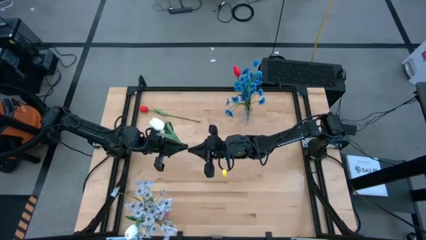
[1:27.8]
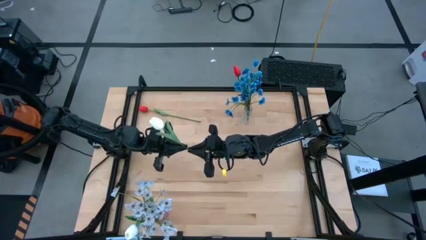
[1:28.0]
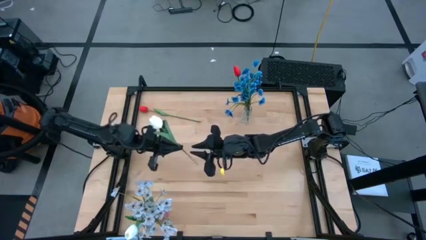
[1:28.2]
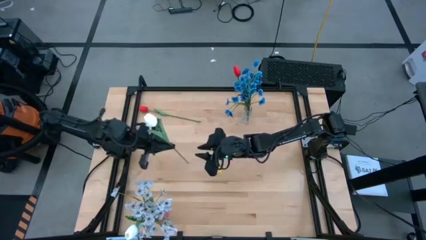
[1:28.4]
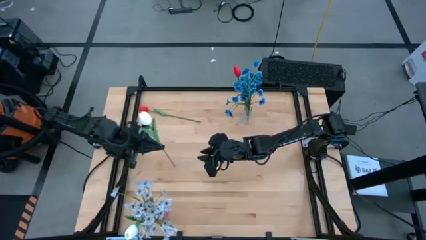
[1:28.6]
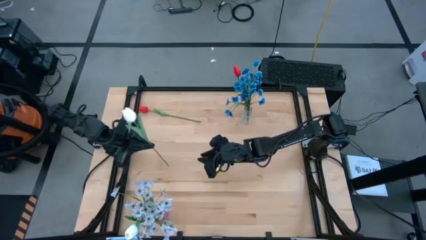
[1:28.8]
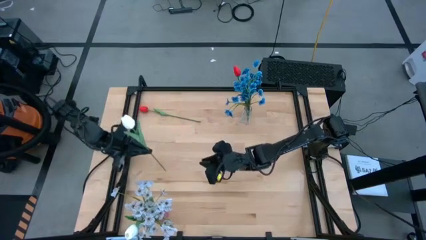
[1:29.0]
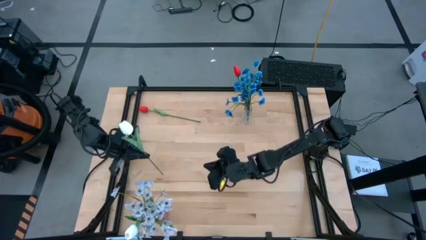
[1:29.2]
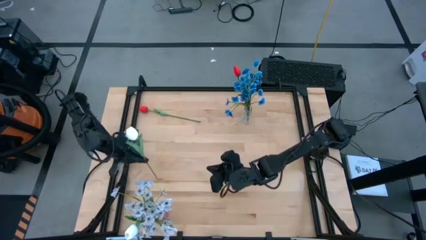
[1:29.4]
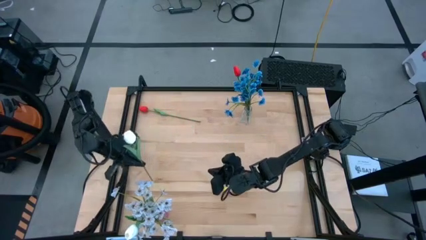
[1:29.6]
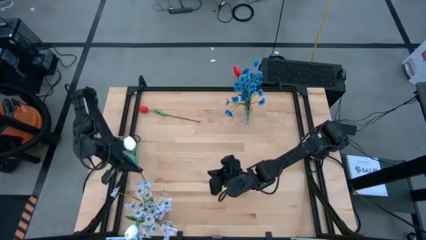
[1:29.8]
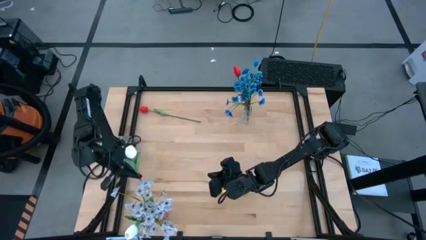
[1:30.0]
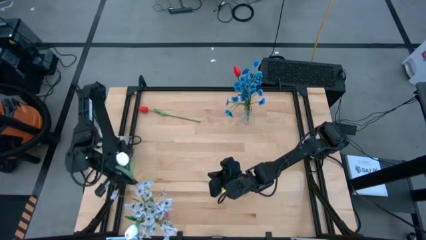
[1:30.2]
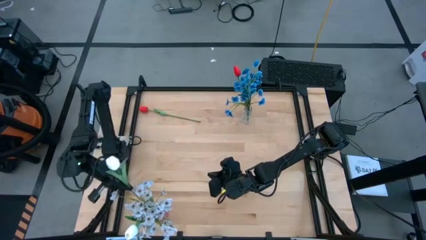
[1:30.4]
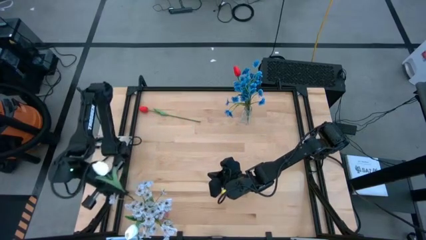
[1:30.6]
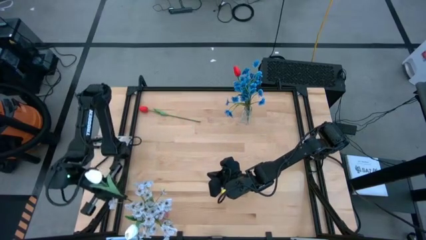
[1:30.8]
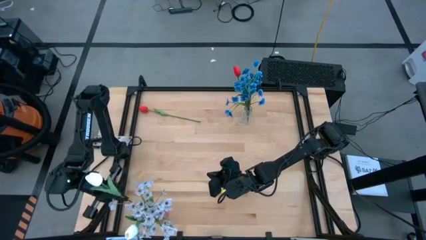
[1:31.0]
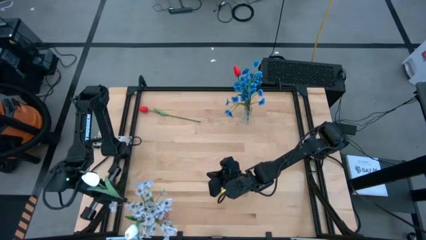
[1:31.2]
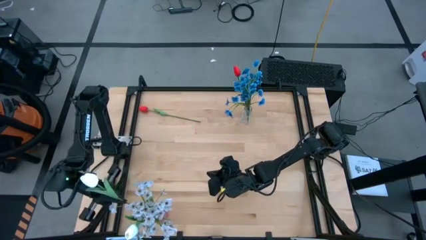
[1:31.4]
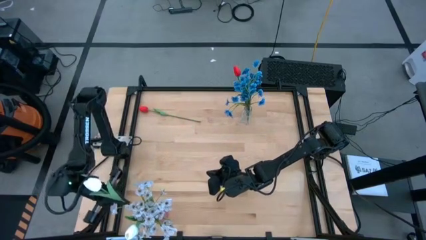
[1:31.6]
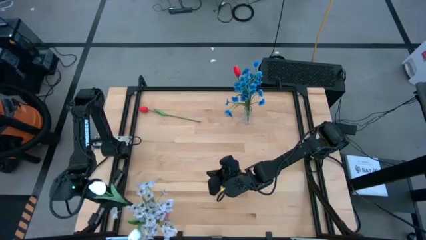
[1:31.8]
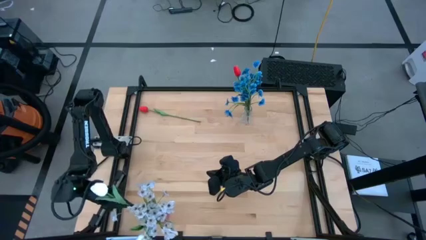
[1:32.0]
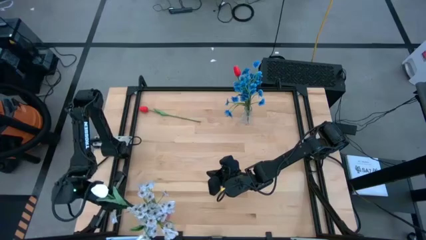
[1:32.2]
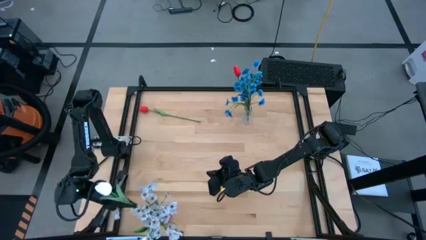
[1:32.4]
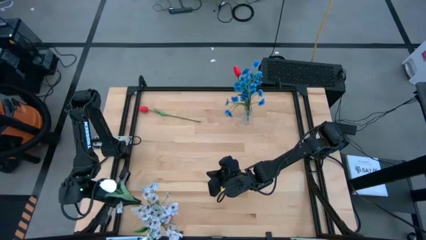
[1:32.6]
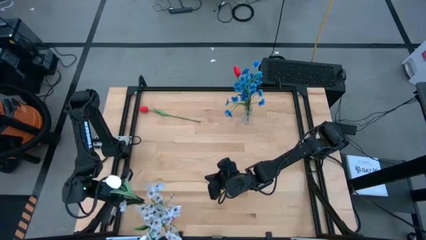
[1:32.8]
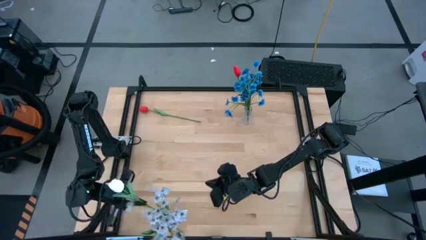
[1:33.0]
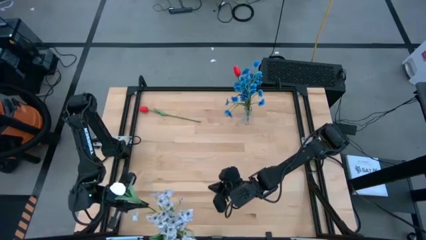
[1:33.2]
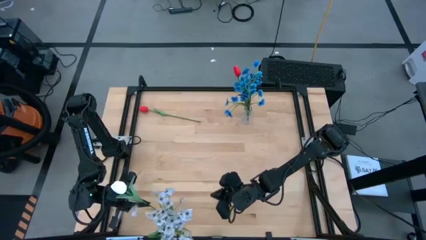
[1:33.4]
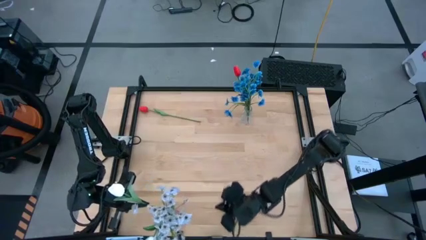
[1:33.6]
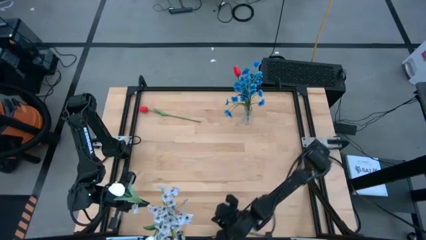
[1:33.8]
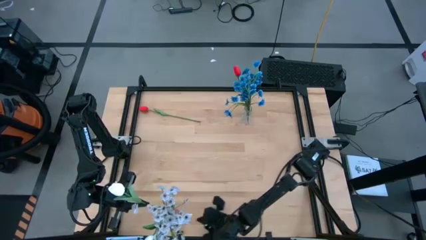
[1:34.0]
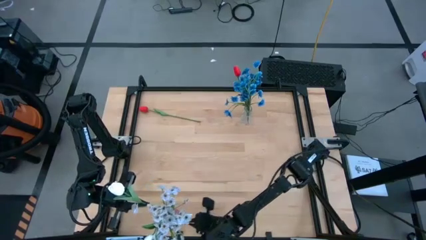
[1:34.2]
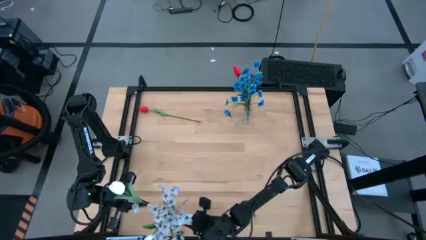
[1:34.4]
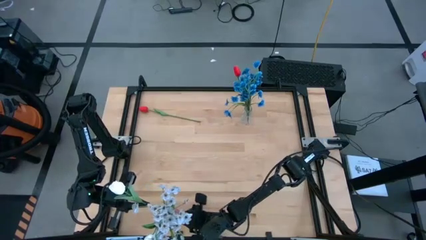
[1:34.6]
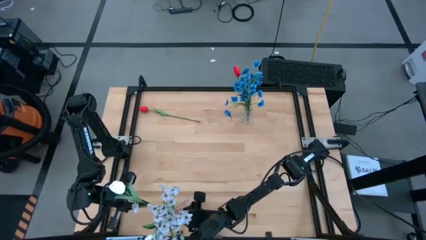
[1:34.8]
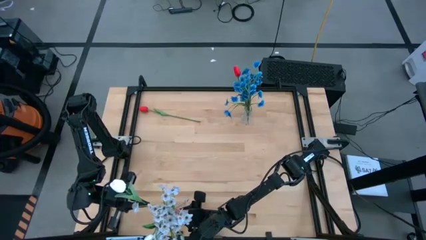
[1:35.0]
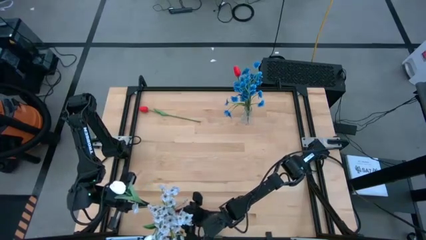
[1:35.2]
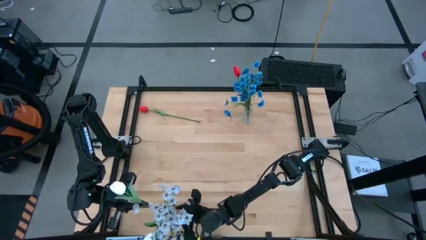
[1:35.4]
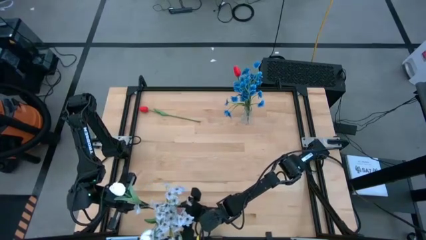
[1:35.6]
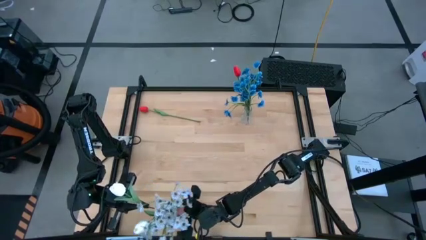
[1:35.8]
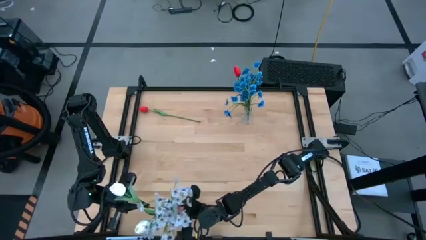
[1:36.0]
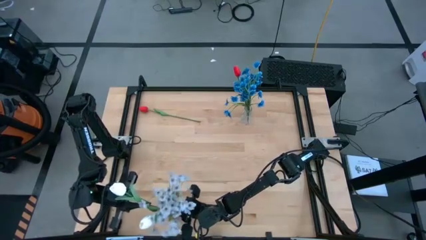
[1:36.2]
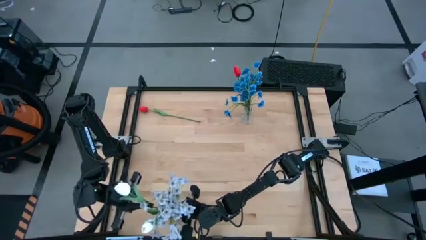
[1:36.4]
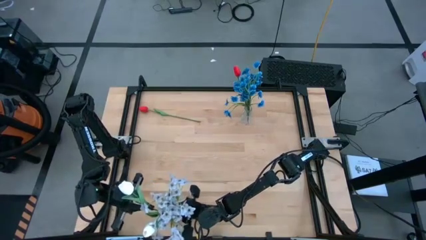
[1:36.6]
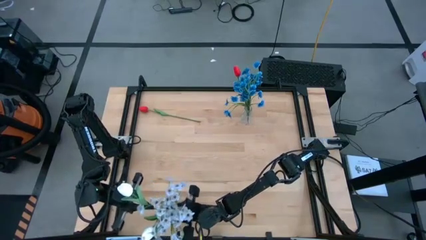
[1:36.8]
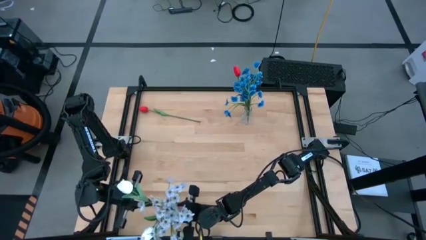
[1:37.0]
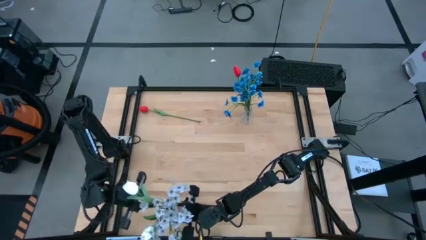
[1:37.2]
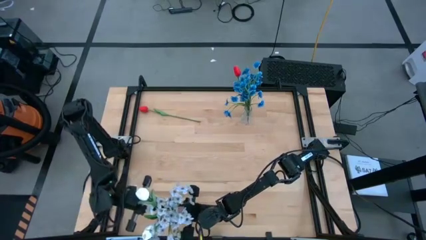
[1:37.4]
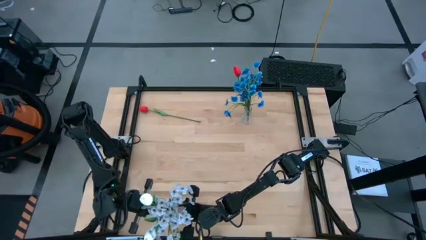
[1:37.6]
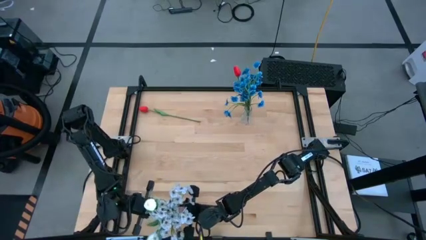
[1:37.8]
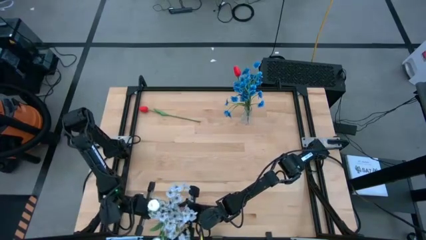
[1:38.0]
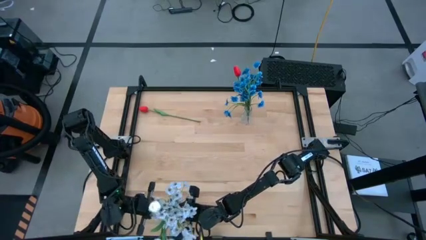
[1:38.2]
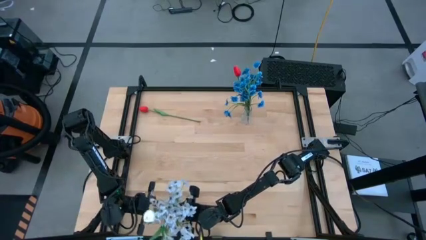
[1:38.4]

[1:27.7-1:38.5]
Task: Sort flowers into vase by color
Put the white flowers into the pink vase

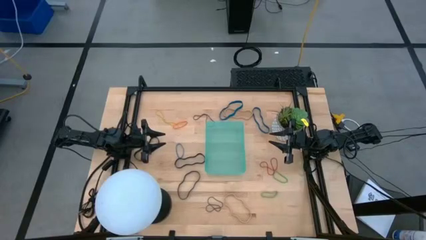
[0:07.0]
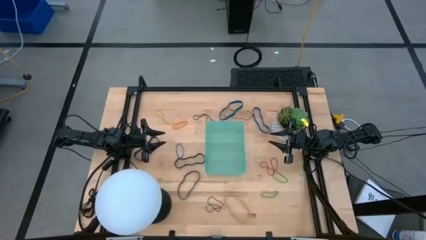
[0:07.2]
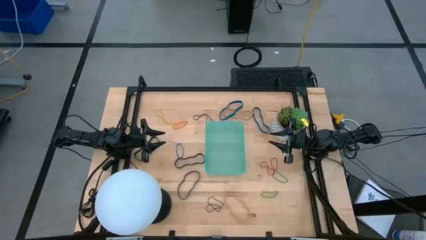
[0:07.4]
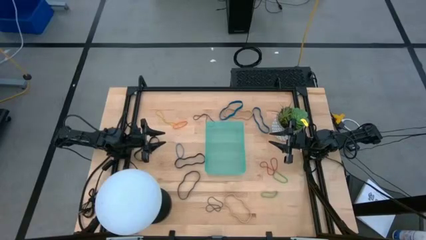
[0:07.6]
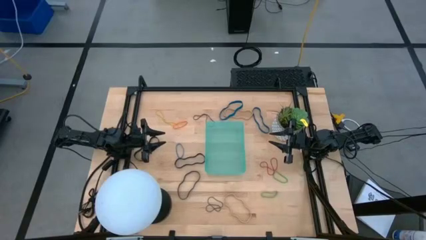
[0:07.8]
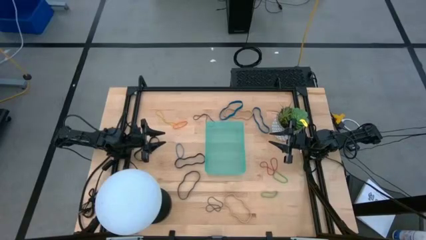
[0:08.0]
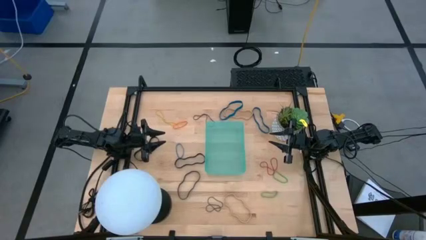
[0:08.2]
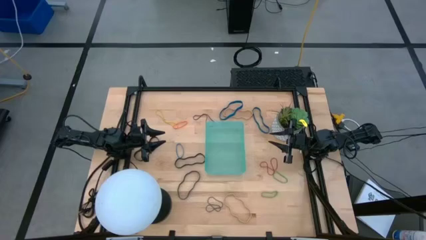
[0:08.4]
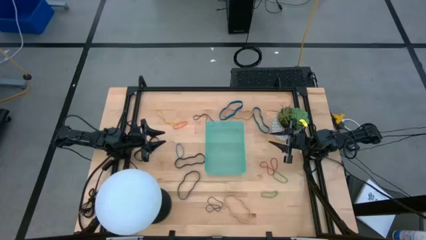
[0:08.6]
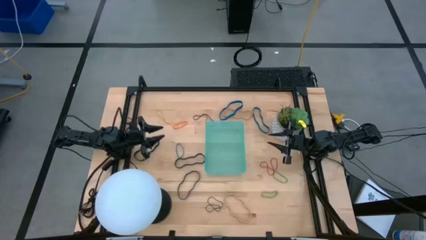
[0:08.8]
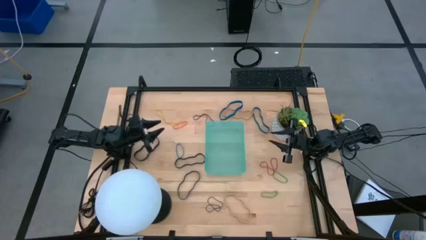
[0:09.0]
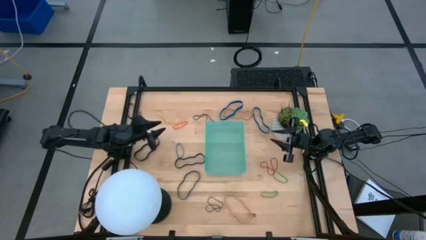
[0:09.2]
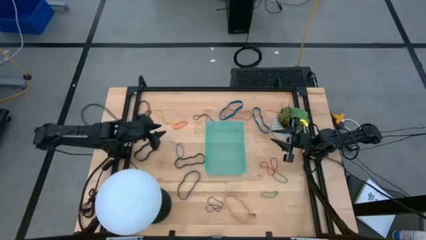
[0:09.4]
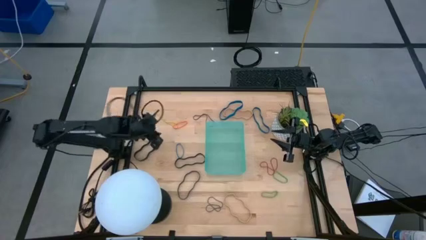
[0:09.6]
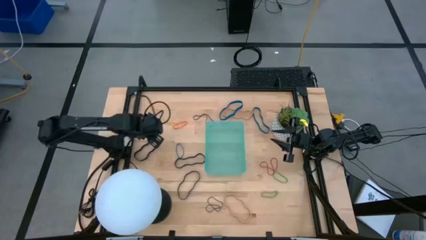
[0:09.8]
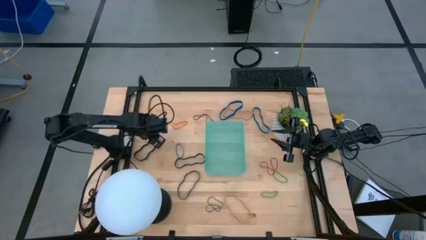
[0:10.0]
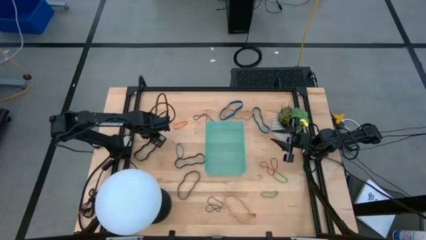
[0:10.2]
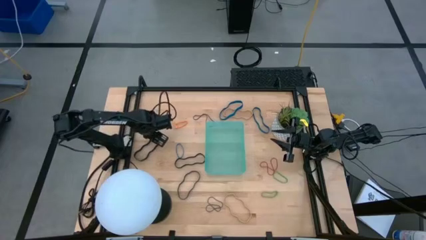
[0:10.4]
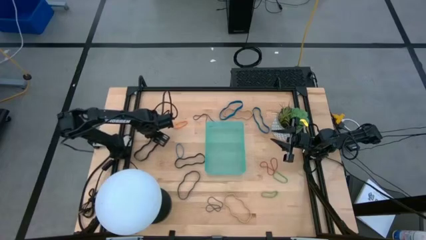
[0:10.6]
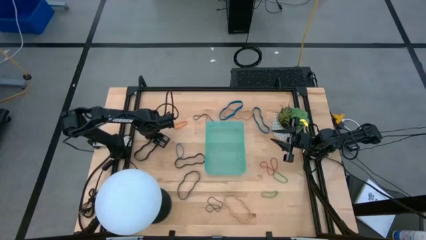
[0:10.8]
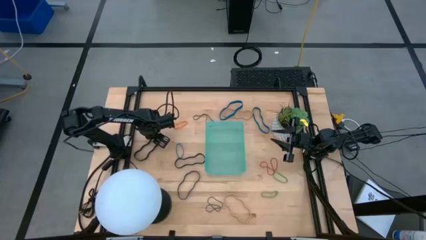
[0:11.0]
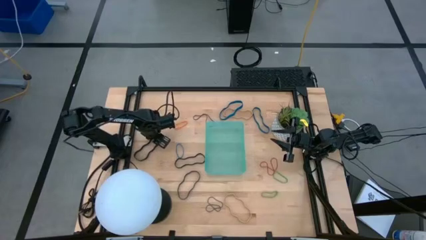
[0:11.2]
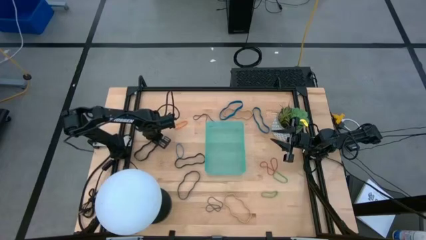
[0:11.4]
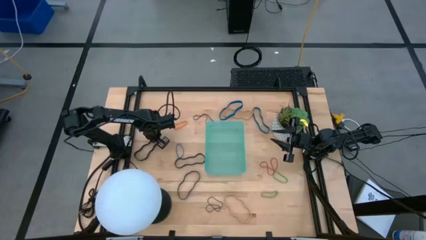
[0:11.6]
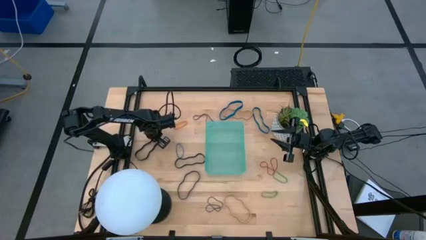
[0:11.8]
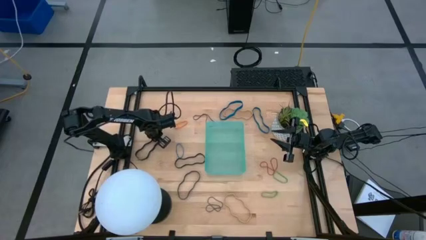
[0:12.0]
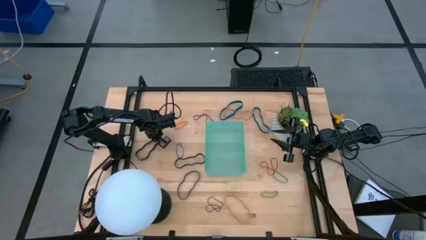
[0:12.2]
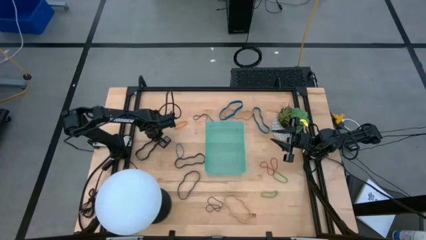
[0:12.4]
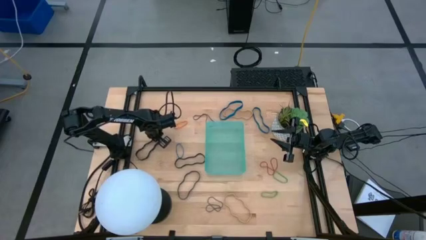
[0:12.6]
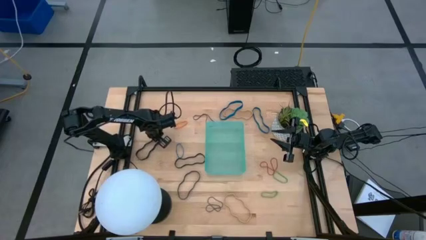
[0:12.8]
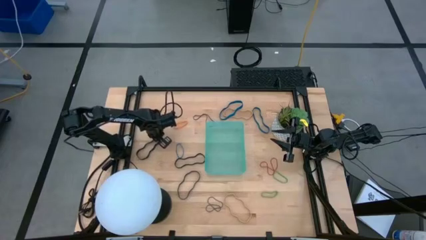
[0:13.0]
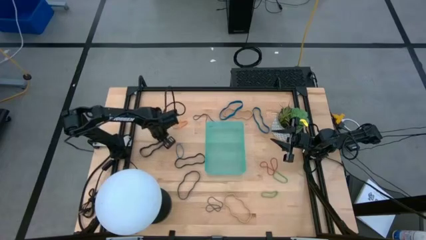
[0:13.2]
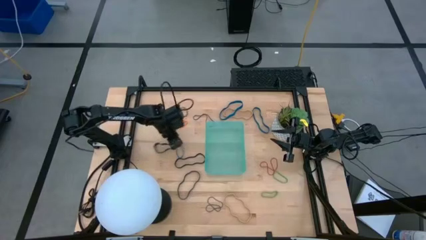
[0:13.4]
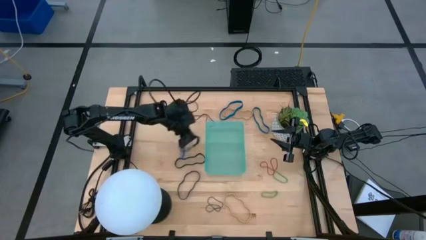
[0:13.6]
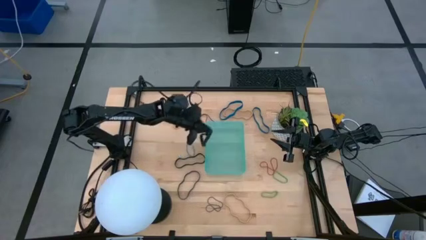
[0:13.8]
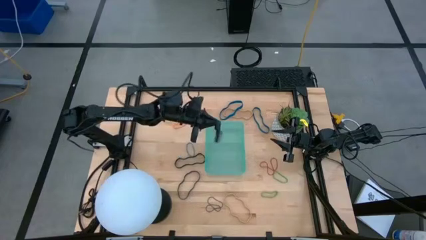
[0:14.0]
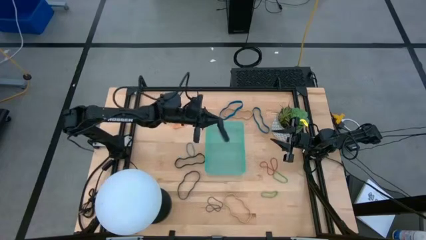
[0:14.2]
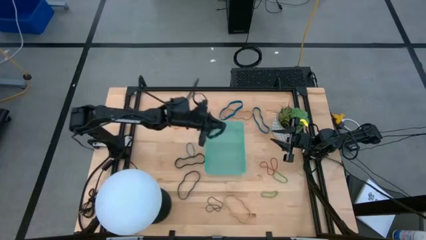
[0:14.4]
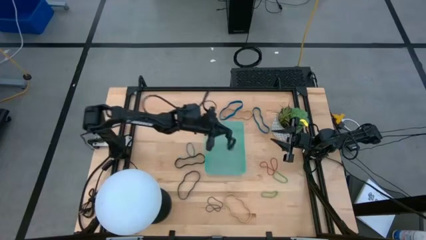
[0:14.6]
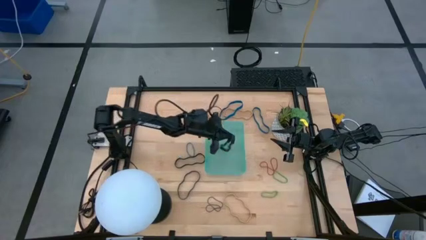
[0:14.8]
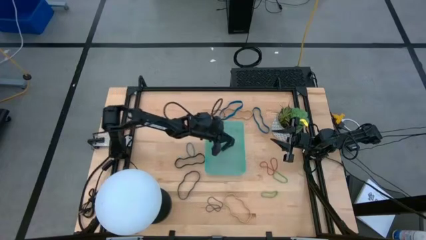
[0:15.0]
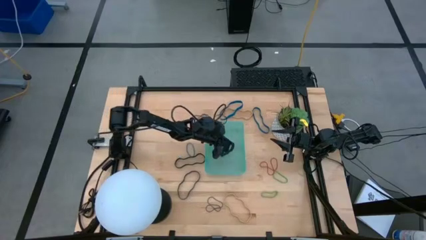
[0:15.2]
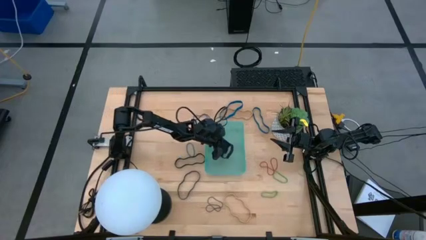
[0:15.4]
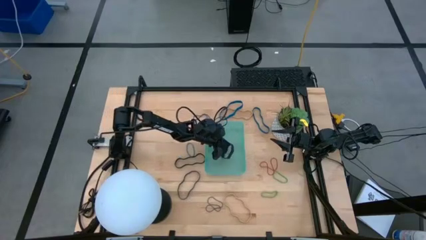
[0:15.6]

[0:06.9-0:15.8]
Task: Pick and place rubber bands into bin
Put the black rubber band into the green bin
